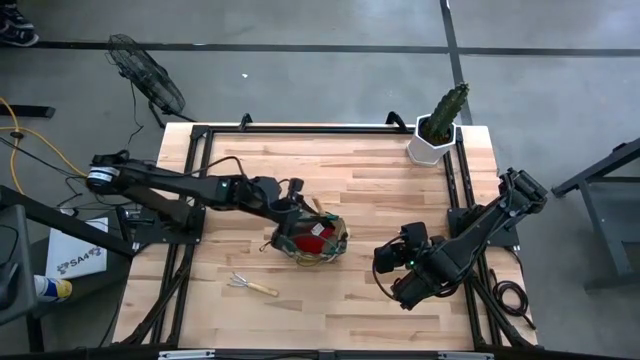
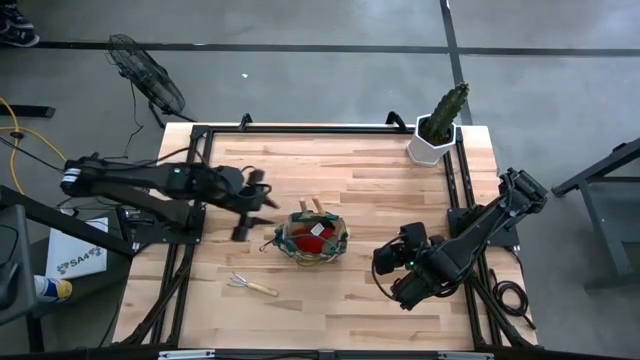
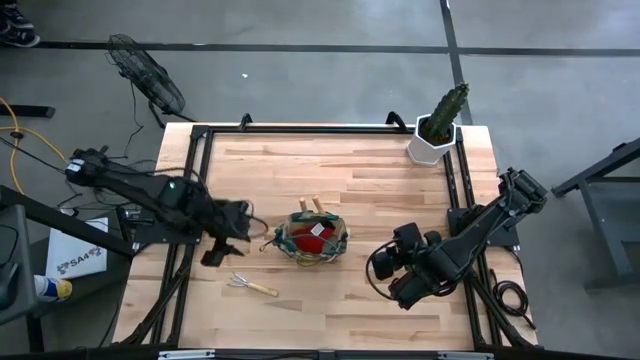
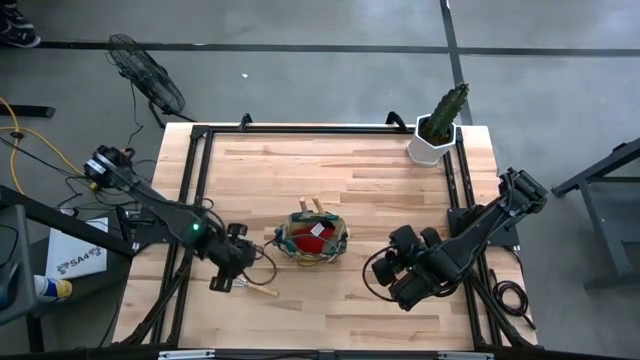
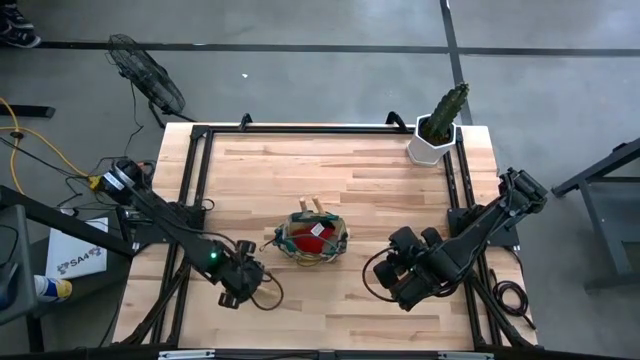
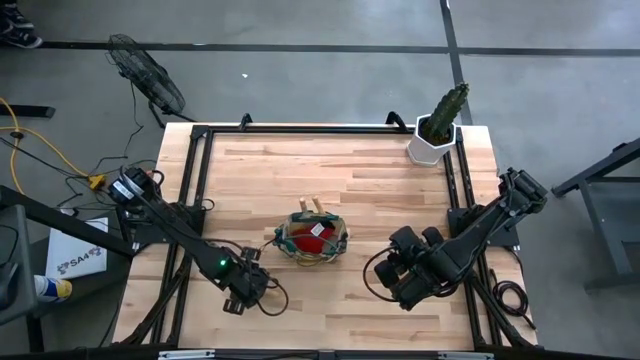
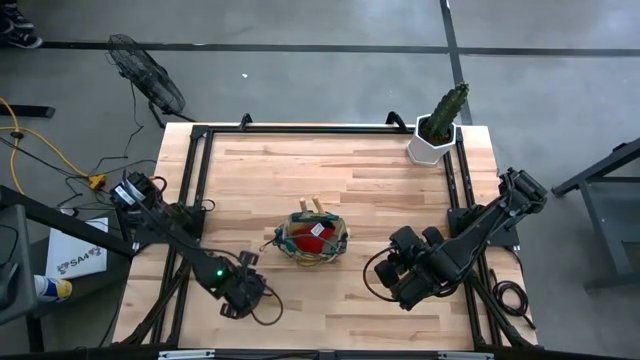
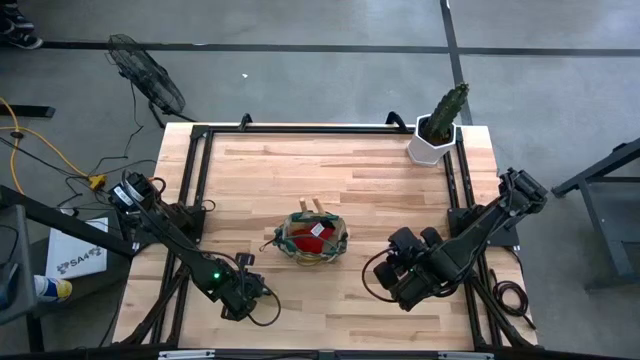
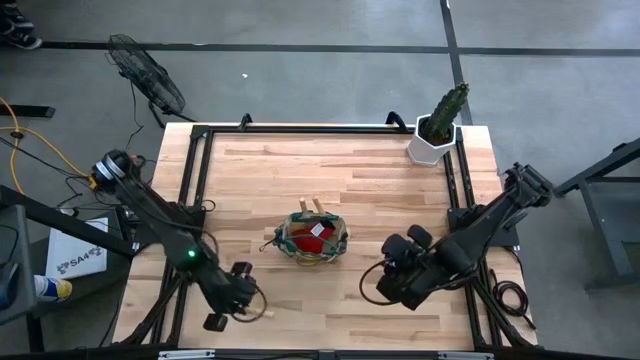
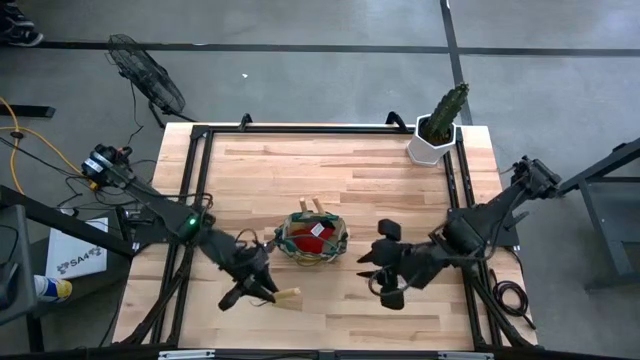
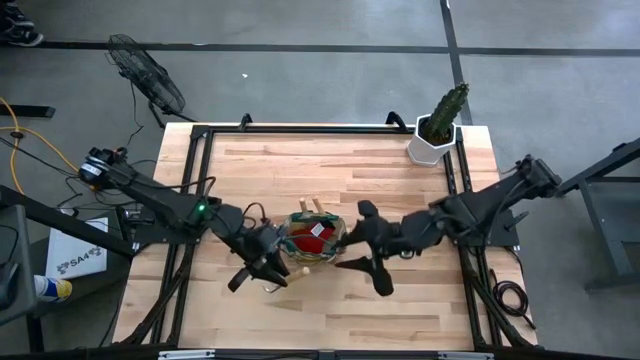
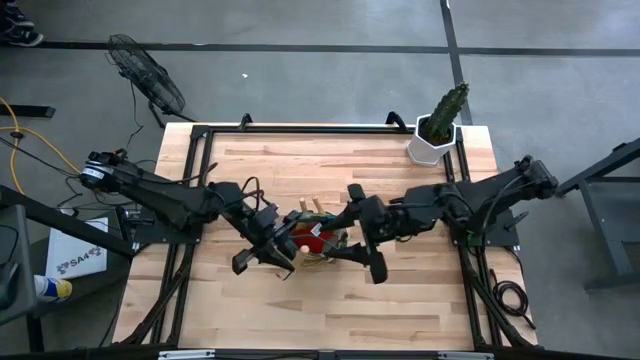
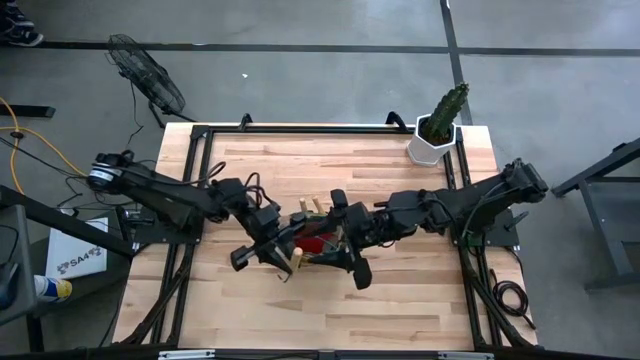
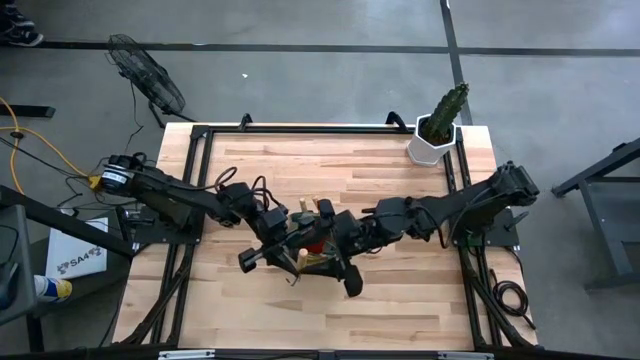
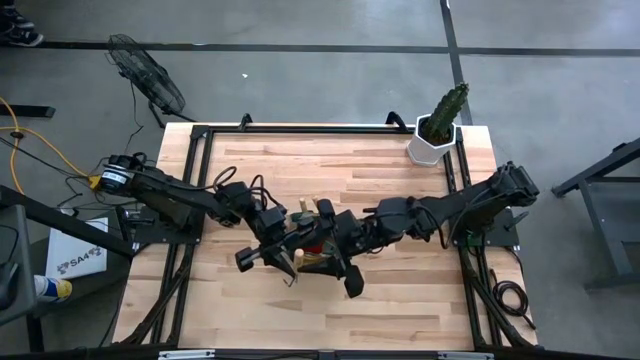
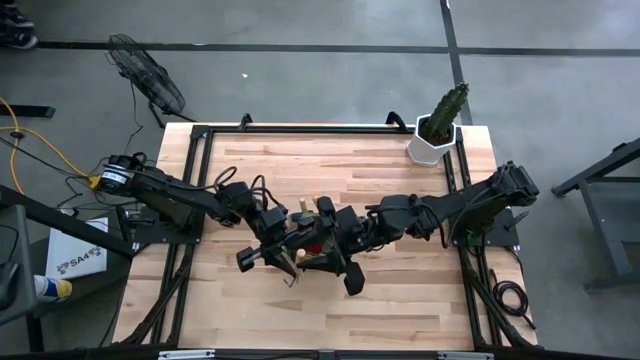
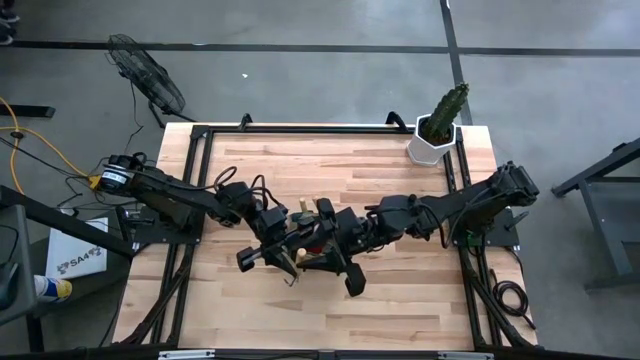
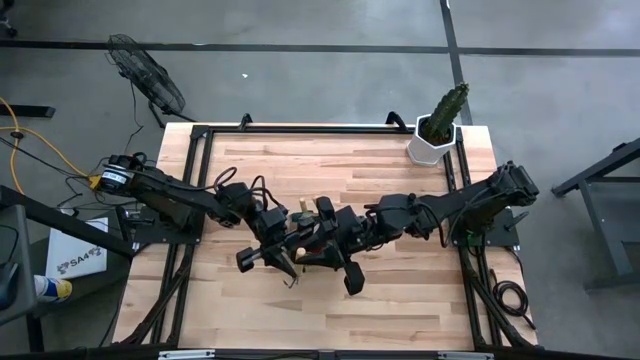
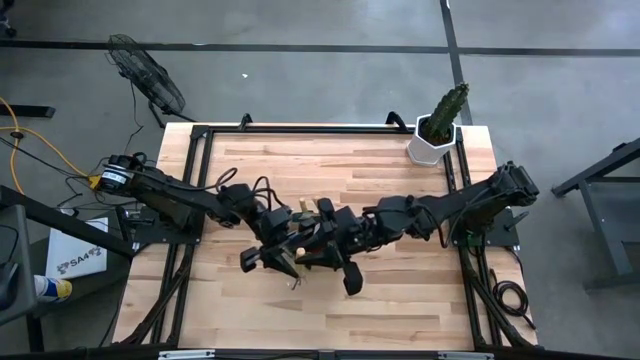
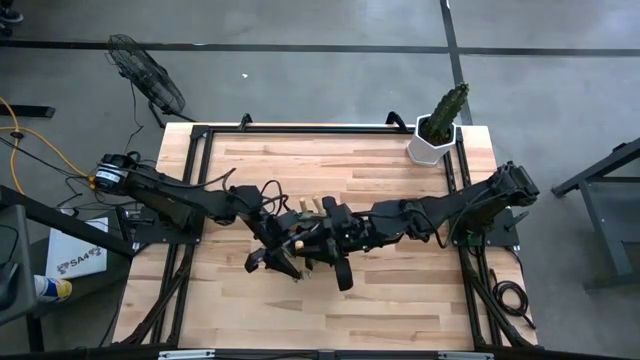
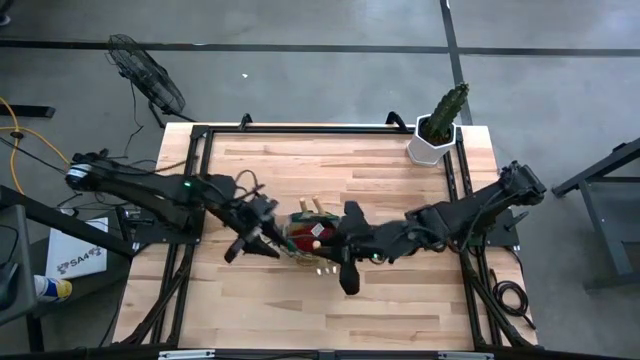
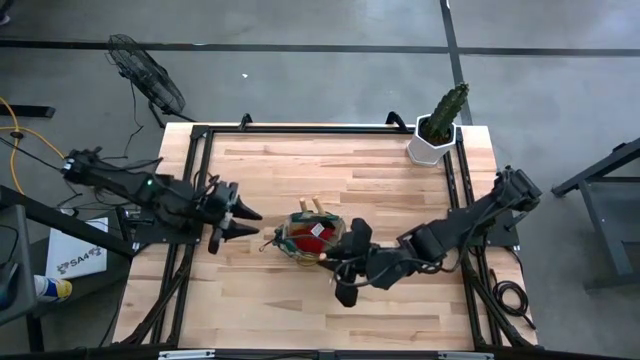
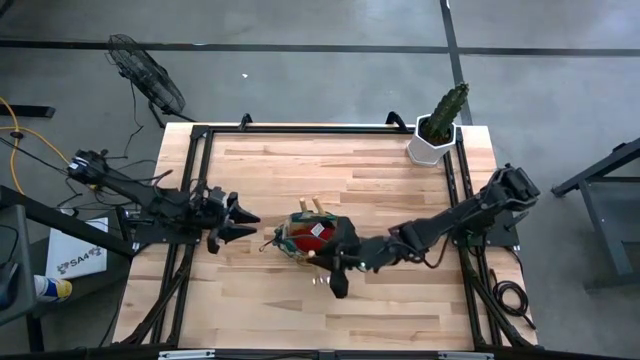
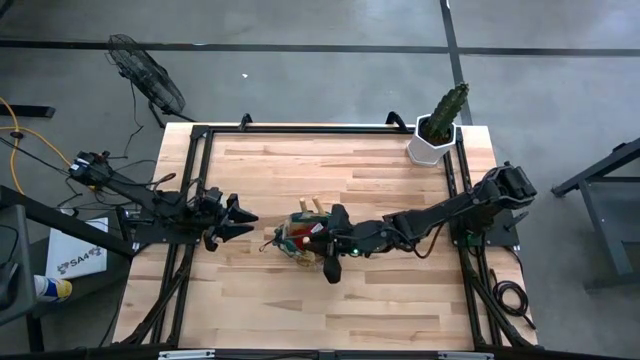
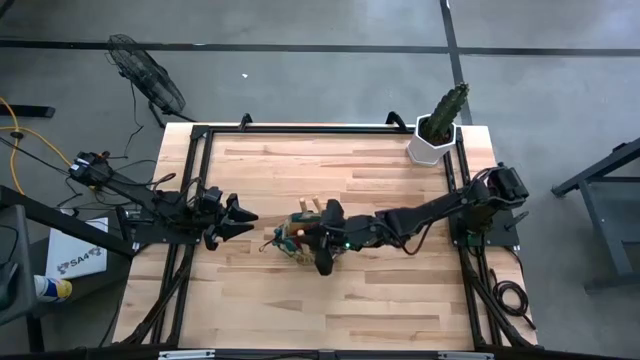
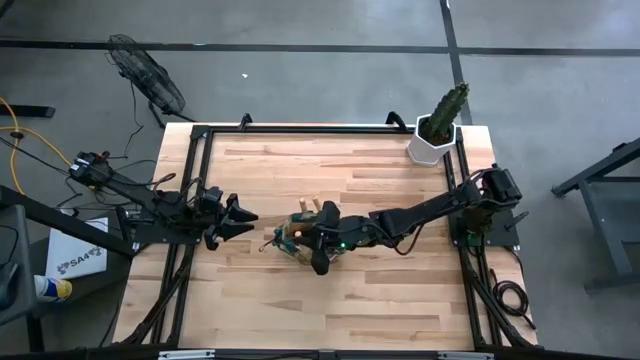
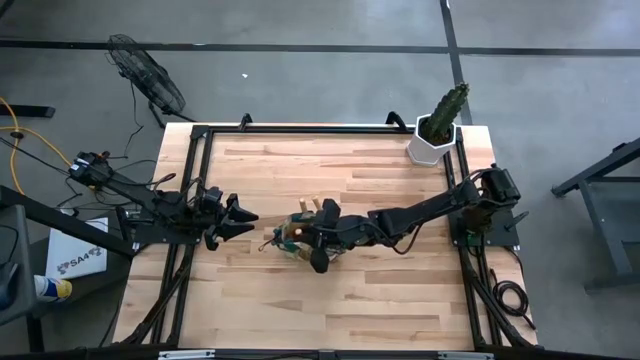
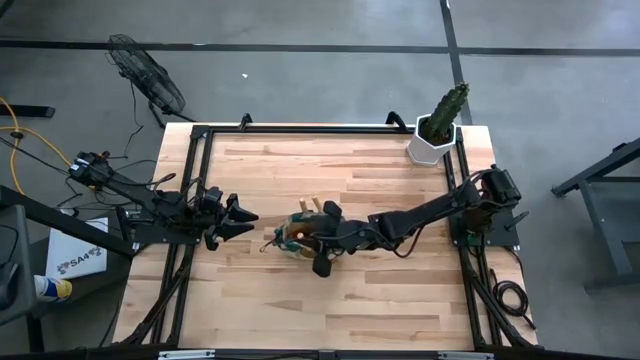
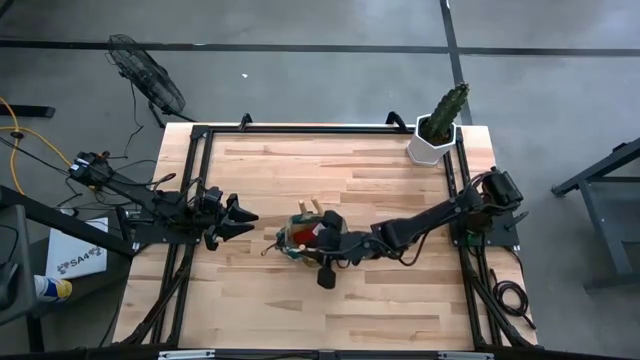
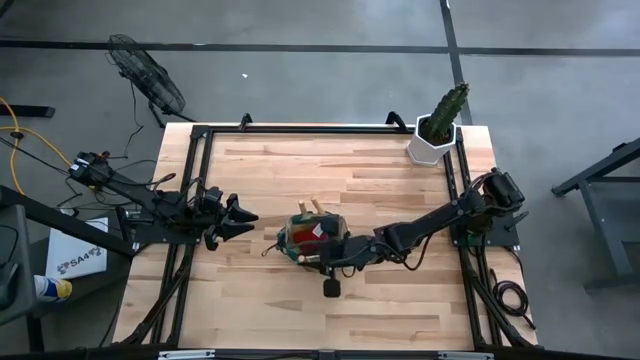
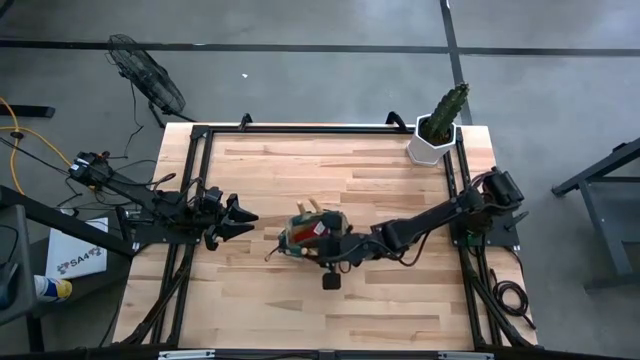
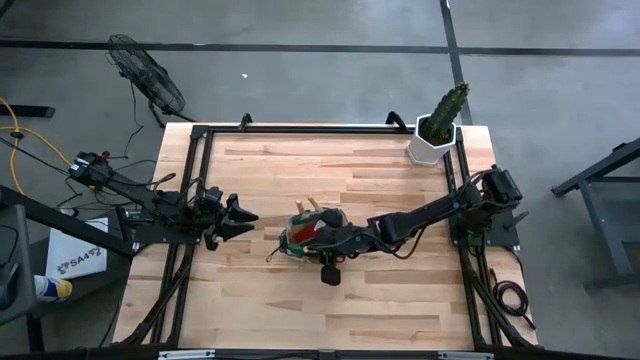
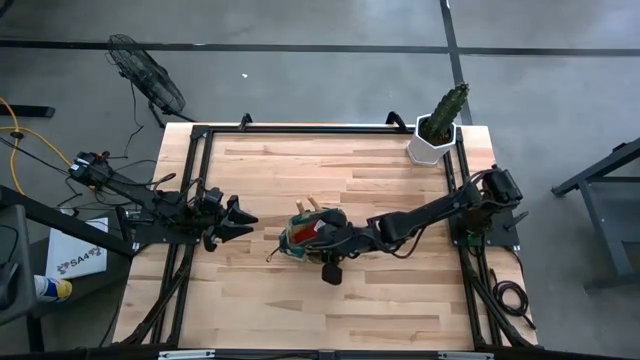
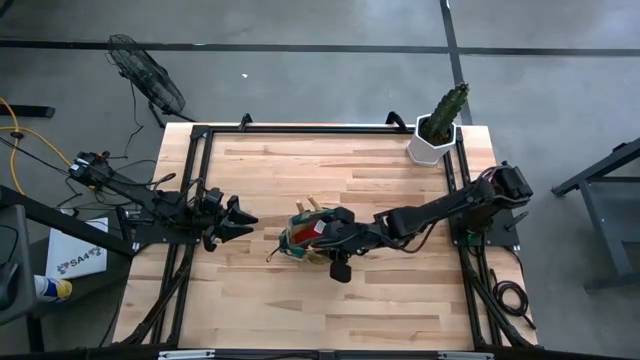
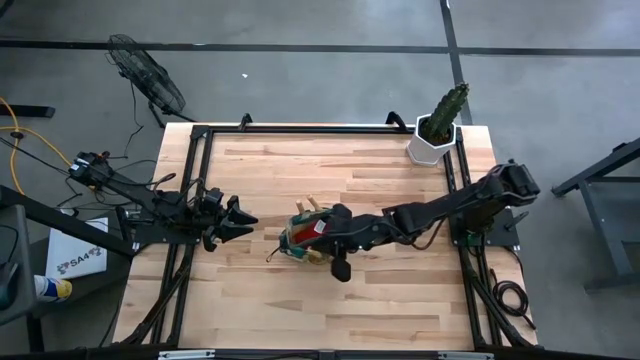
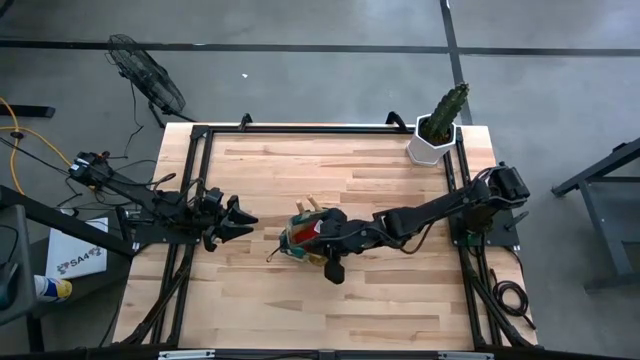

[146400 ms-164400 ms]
Task: Pick & Place Garden tools in Gardening bag
Put the light brown hand rake into the gardening bag

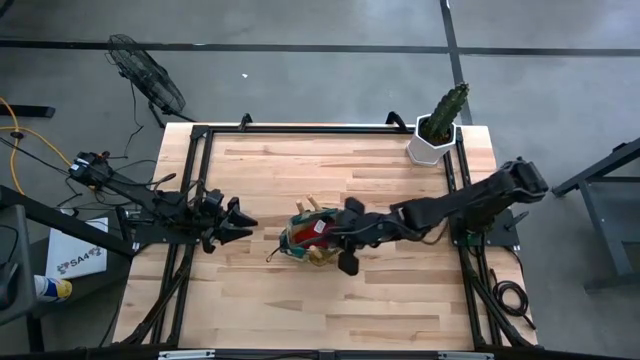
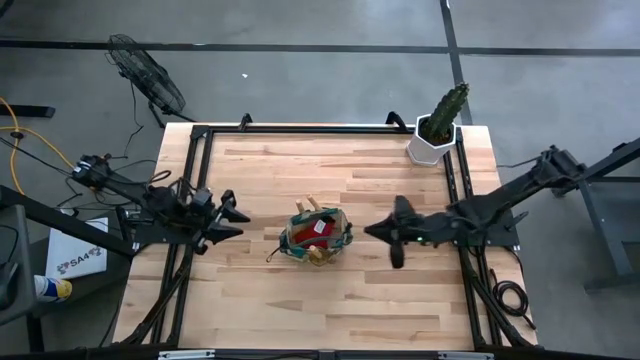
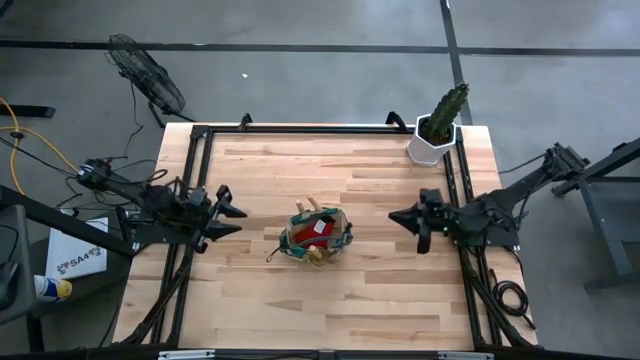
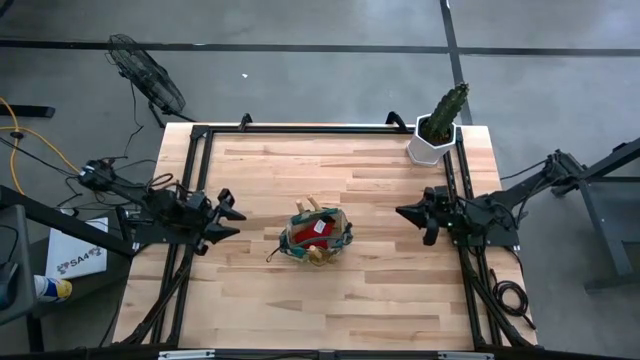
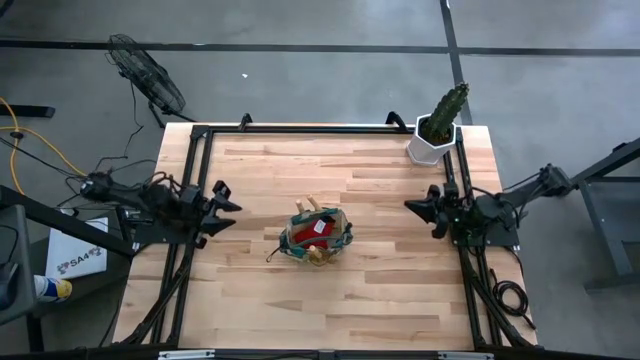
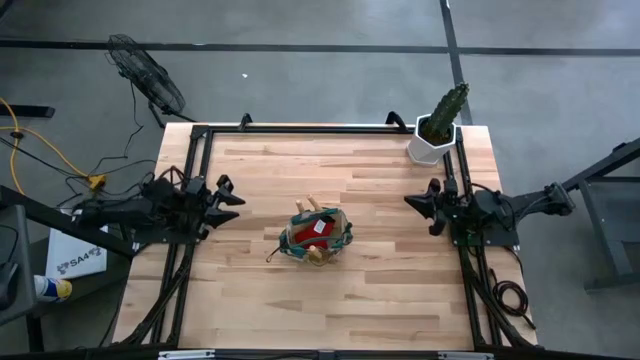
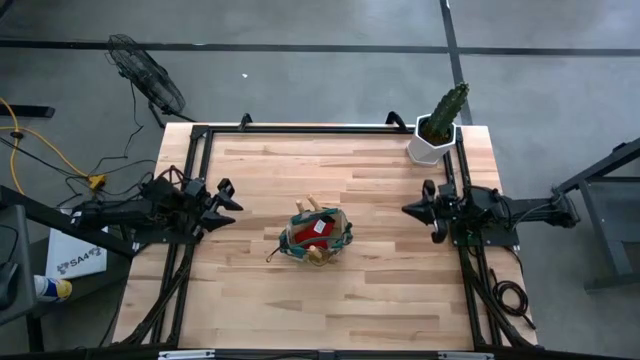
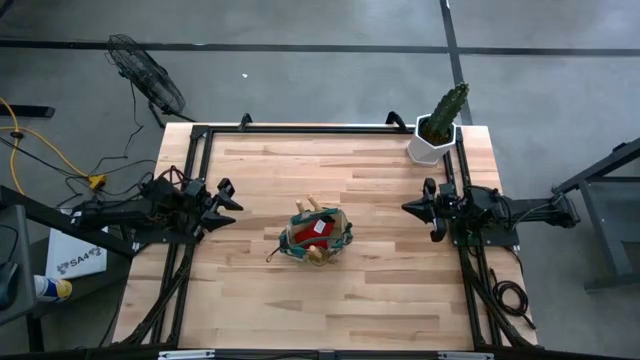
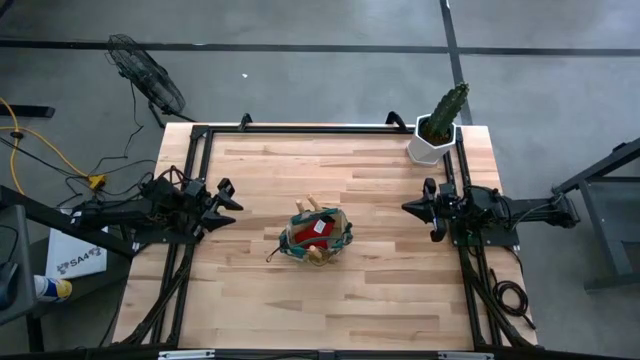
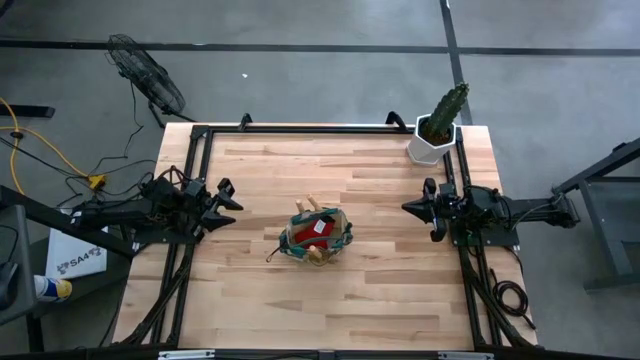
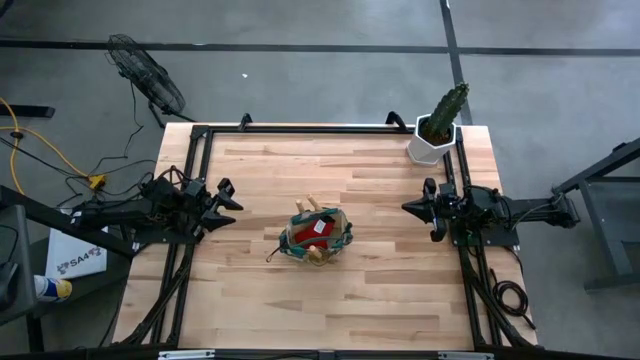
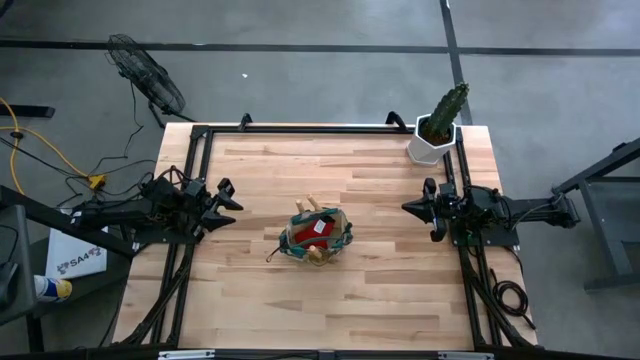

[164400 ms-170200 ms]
Return to Home Position
